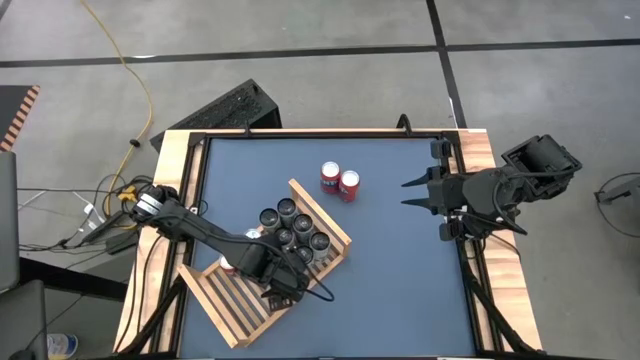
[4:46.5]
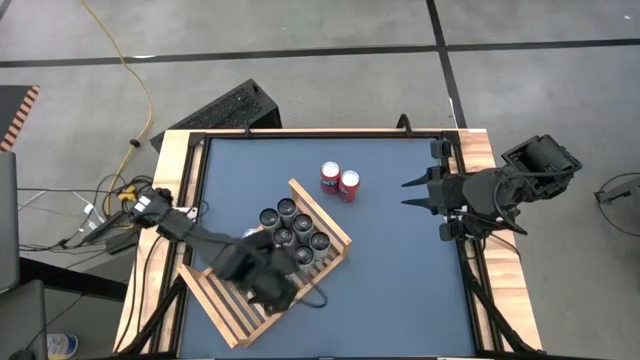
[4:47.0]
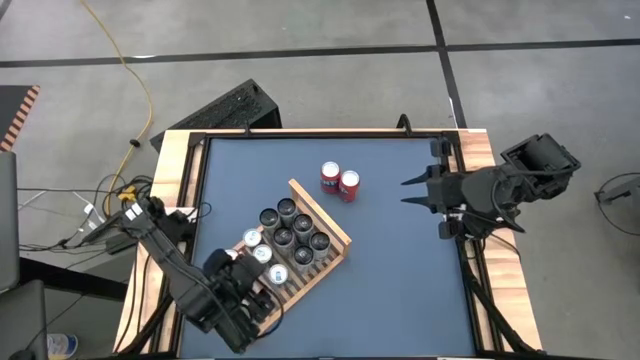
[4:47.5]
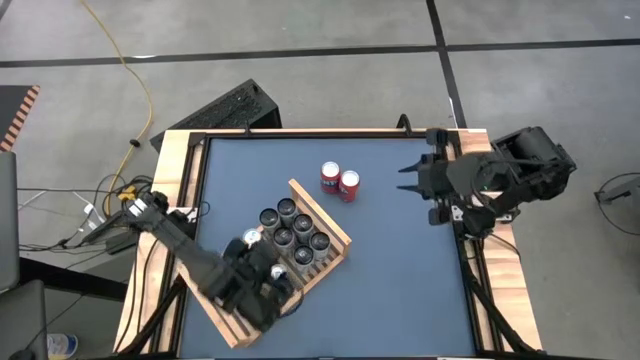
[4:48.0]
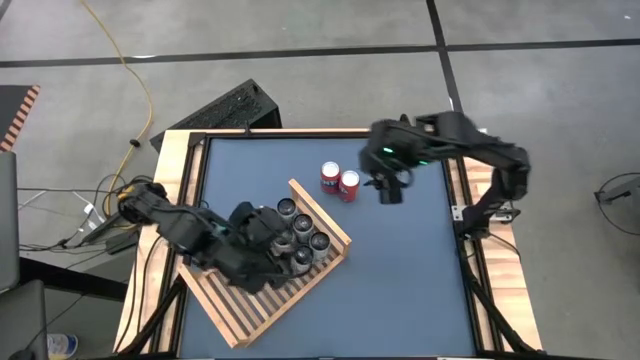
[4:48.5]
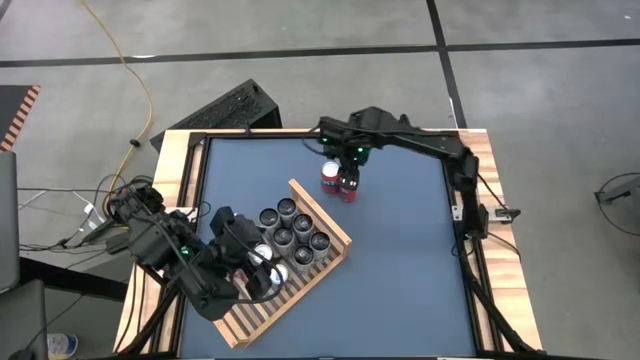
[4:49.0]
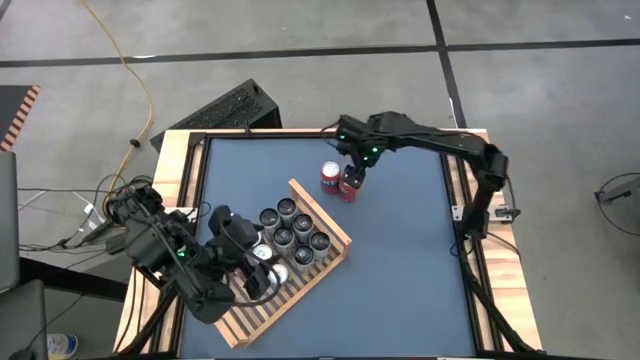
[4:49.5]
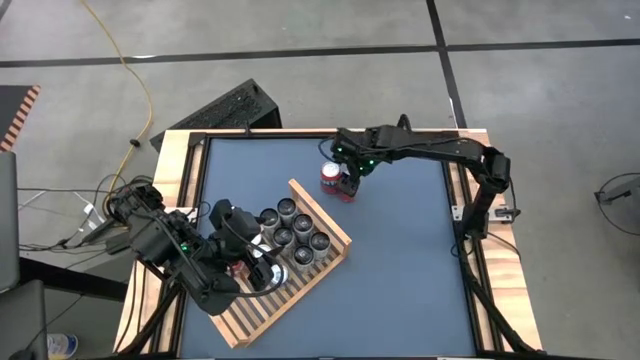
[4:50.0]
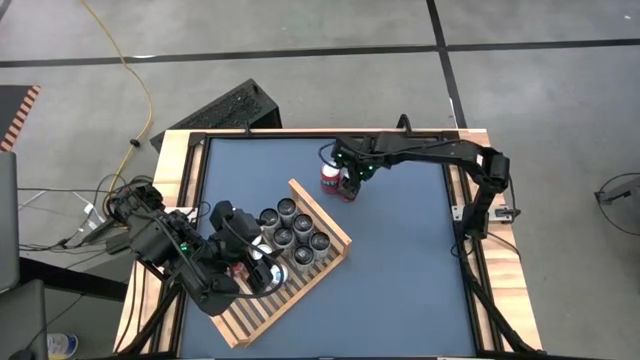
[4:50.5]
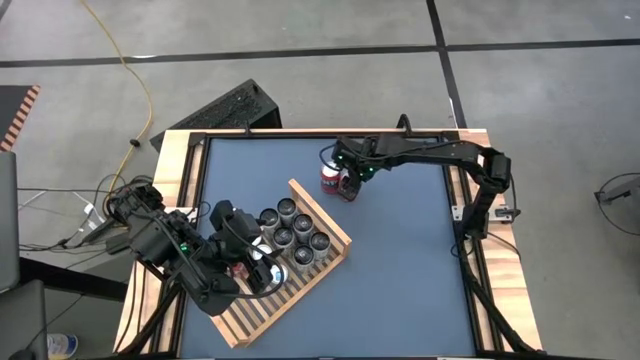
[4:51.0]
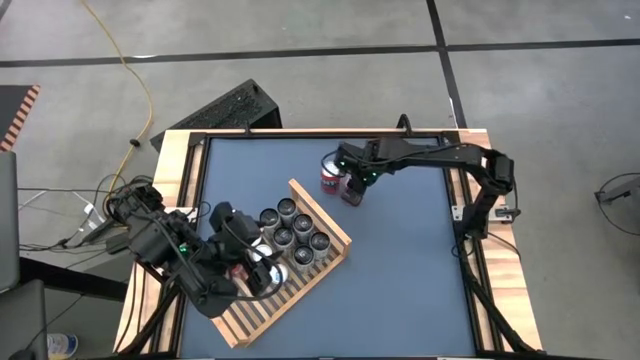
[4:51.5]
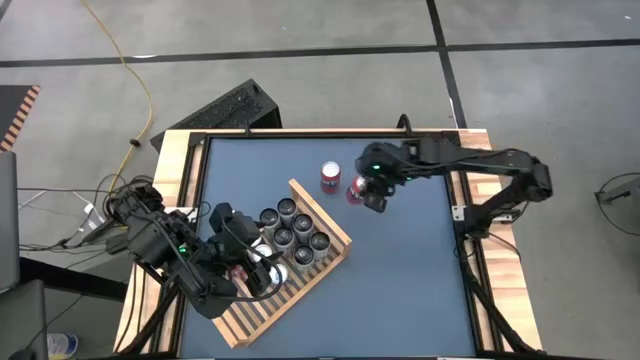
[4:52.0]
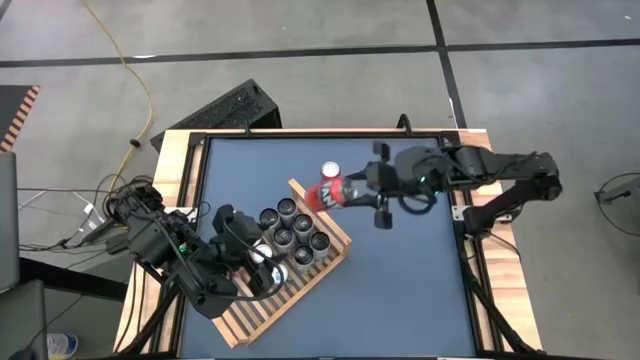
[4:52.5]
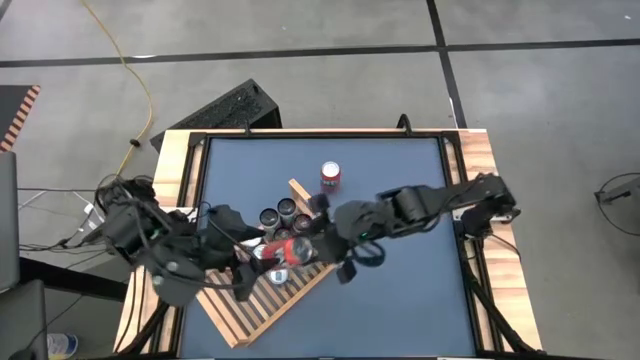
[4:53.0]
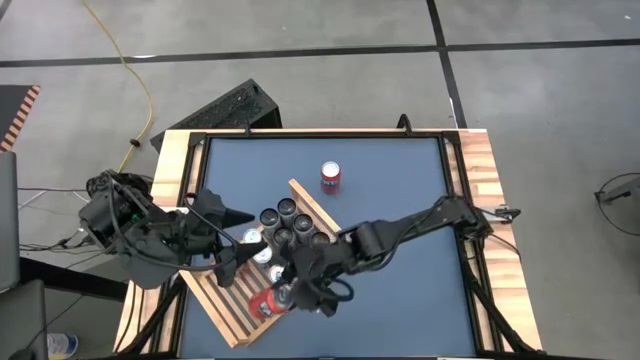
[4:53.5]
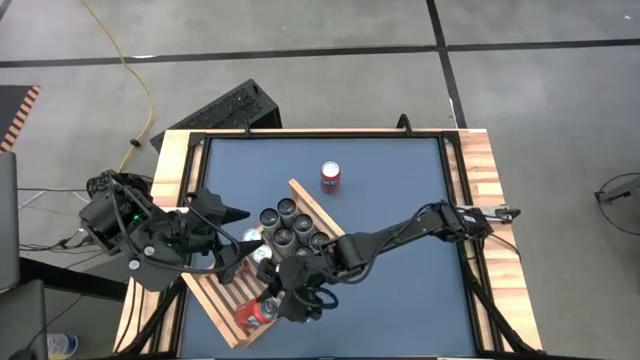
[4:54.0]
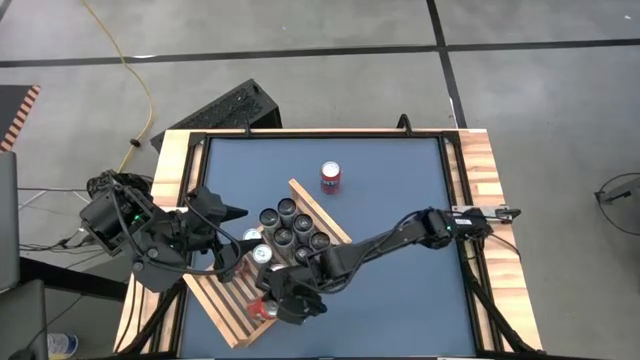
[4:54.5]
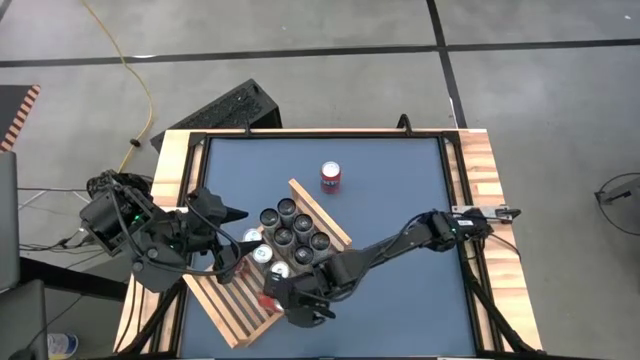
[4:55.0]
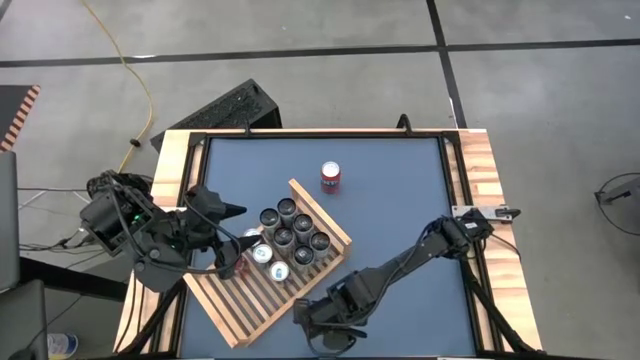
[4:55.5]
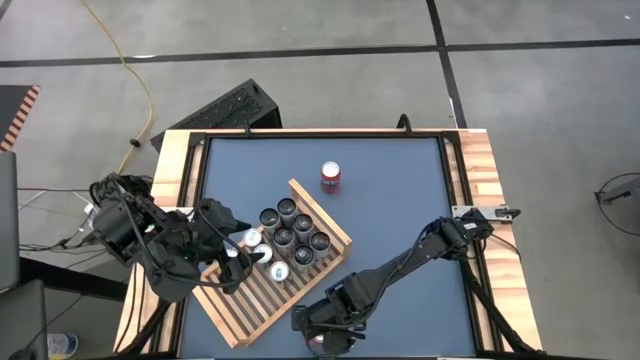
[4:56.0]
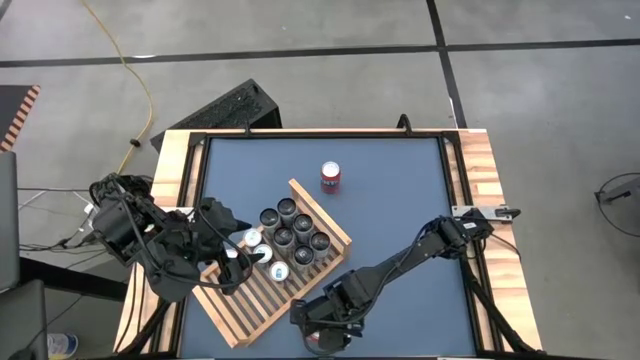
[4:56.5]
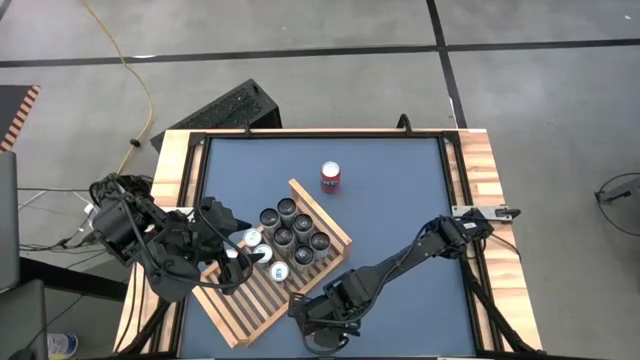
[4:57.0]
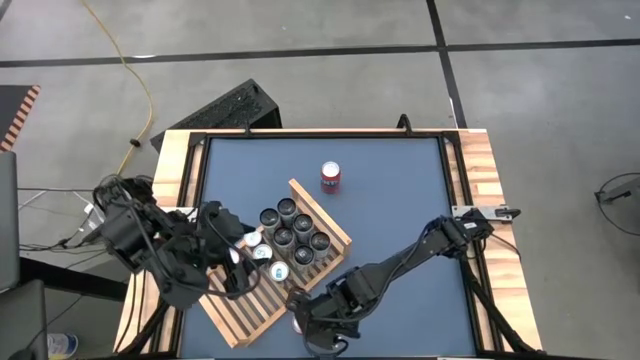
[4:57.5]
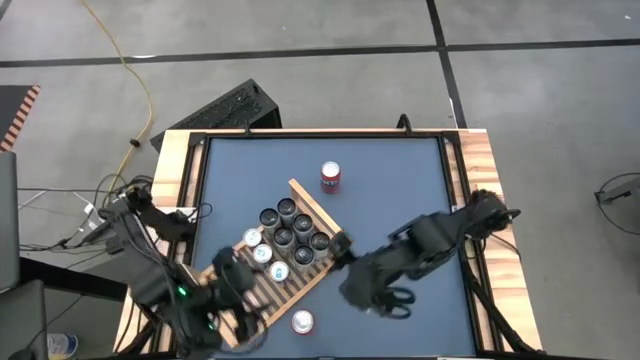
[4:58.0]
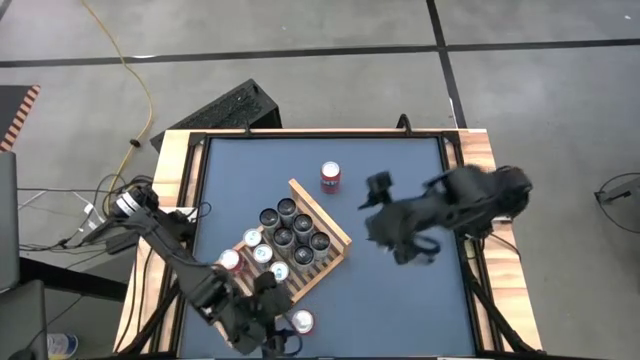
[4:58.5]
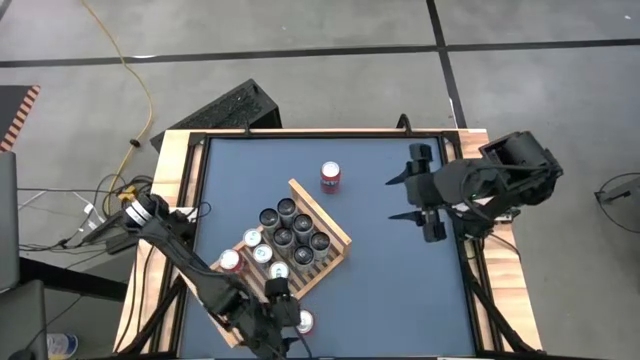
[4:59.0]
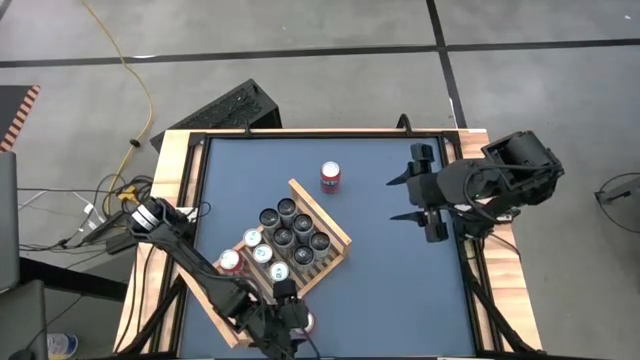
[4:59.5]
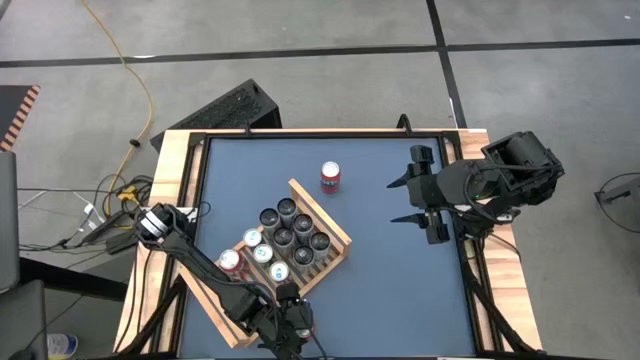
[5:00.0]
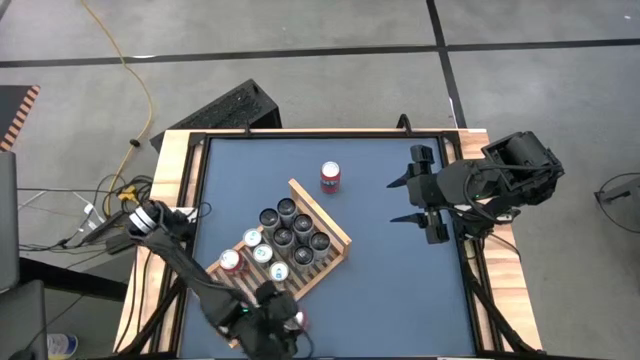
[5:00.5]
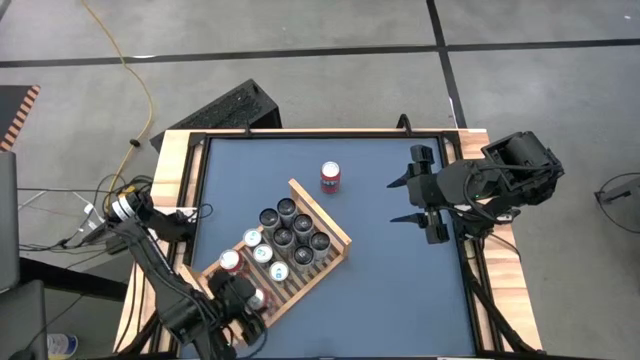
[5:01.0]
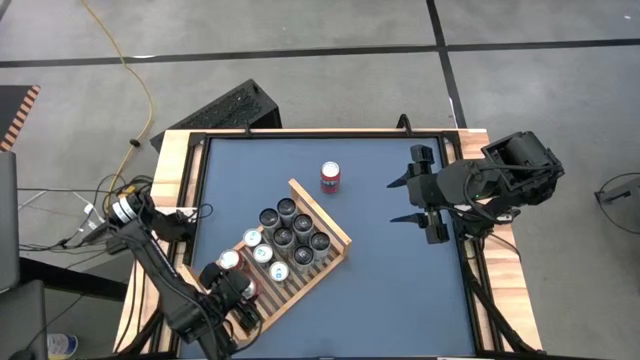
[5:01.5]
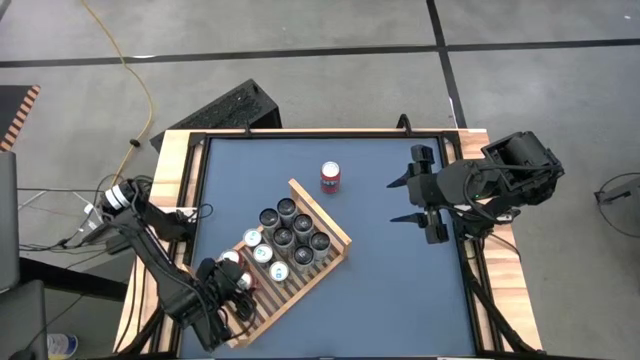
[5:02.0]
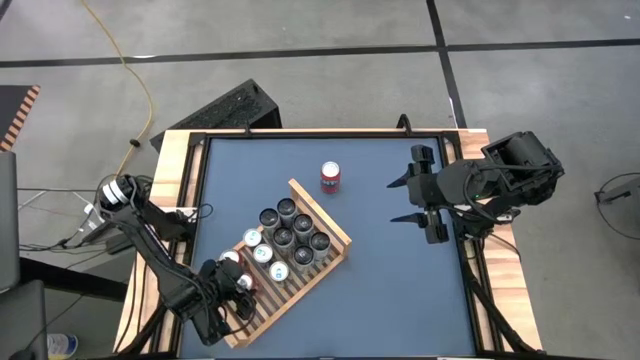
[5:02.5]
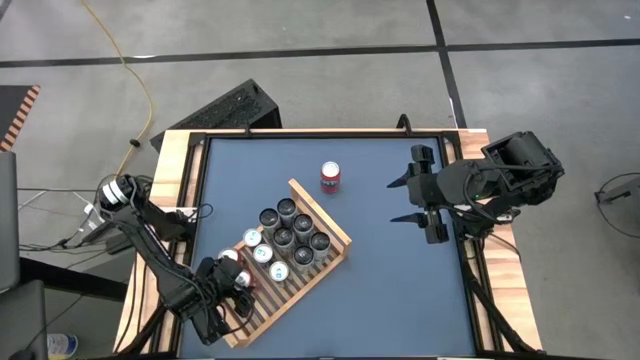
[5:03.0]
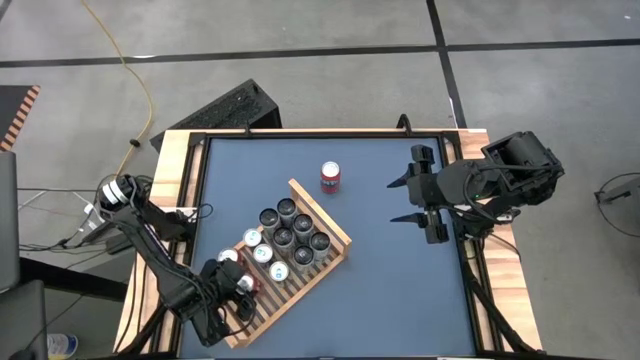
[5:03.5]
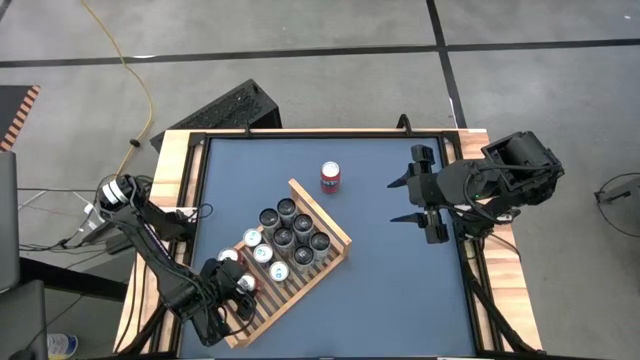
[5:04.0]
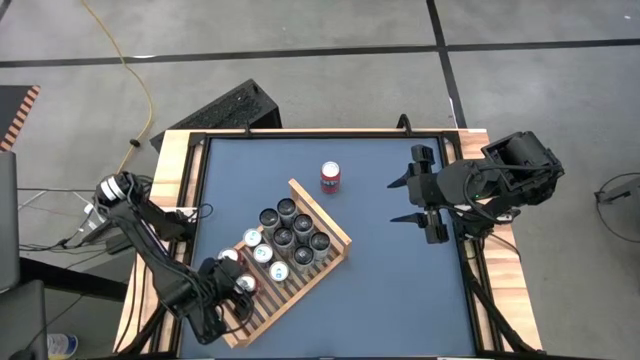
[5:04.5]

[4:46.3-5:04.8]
Task: Place canned beverage on shelf
Put the right red soda can on the shelf aligned with the other red soda can

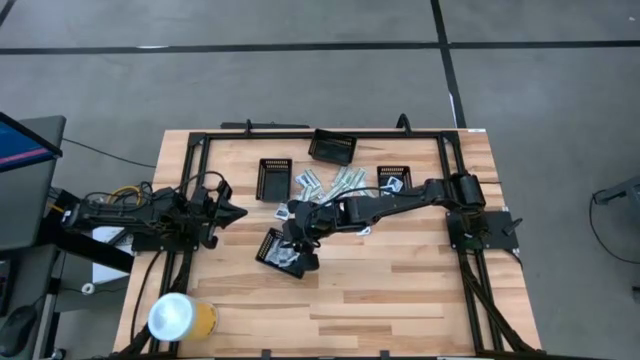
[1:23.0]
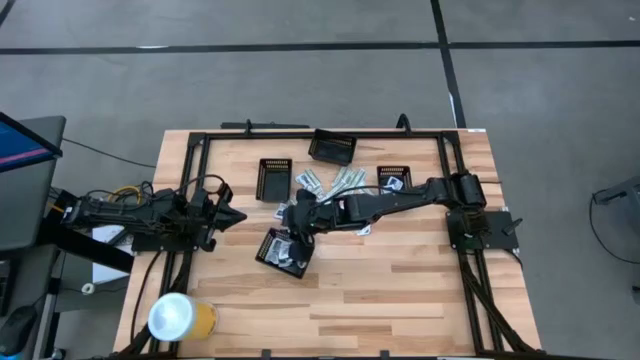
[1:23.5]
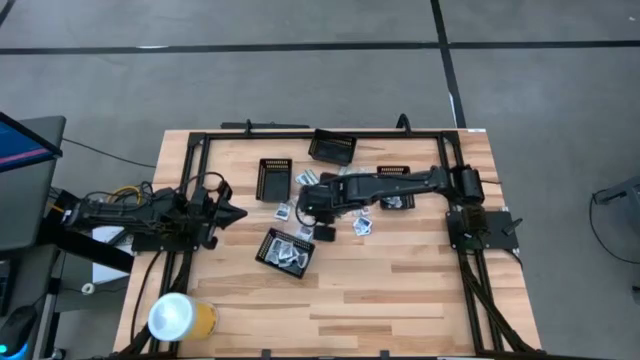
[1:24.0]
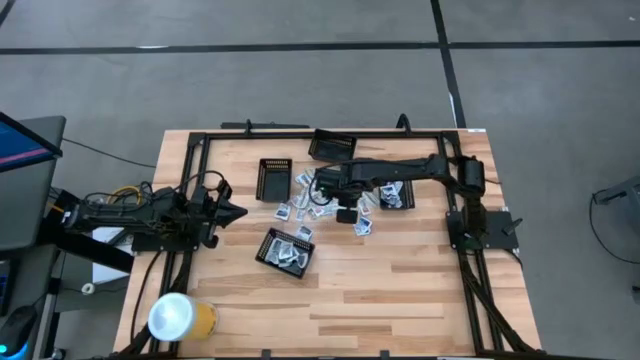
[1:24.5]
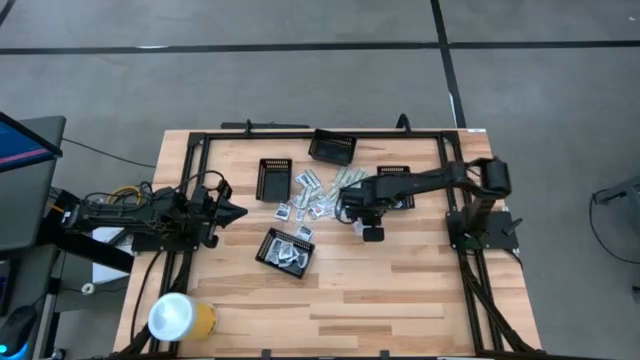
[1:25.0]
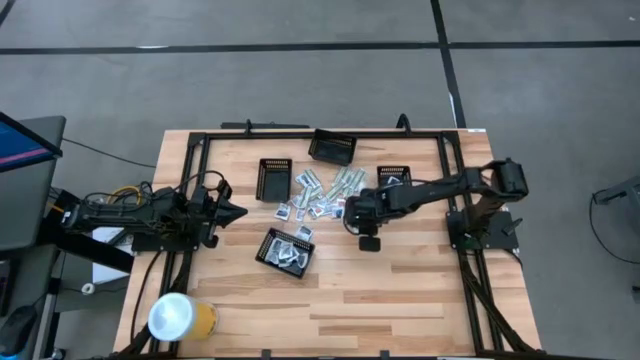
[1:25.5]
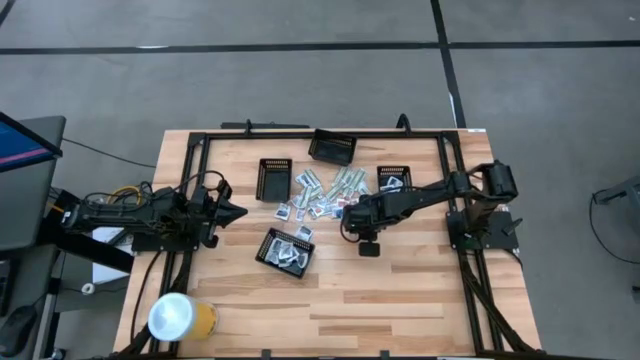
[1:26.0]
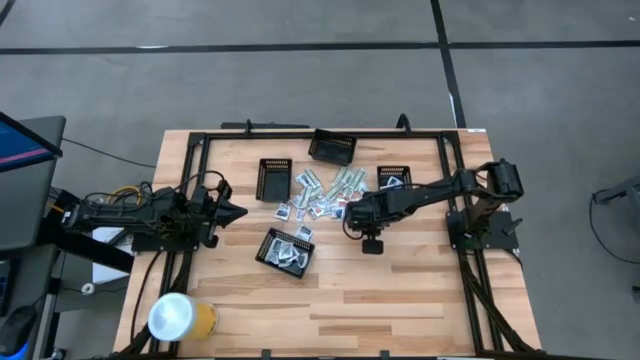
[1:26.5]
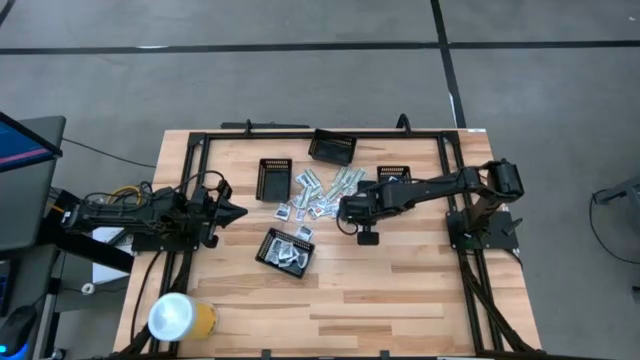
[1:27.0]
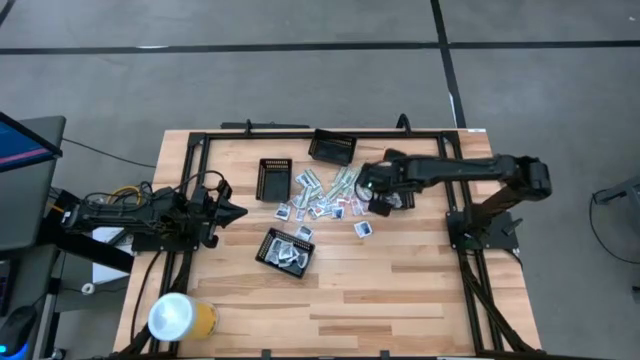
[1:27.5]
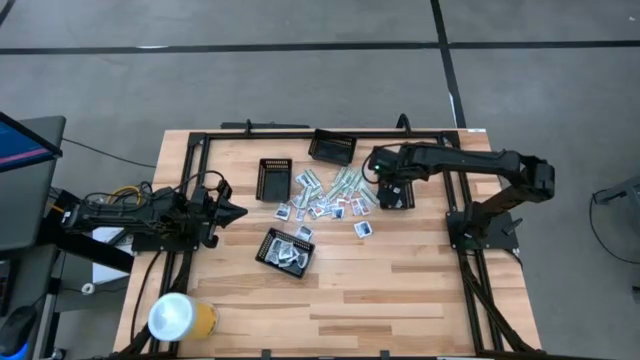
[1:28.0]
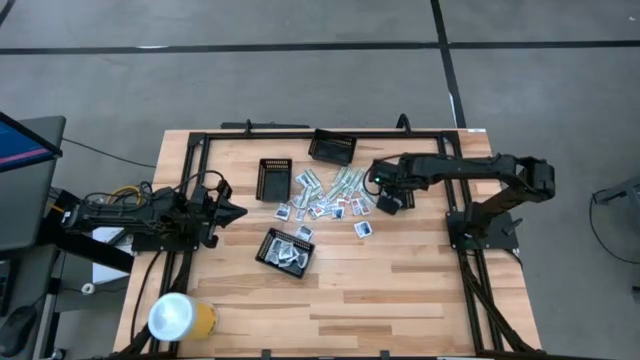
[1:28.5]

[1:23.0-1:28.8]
Task: Pick & Place First Aid Supplies
Put the white alcohol pad into the right black bin
